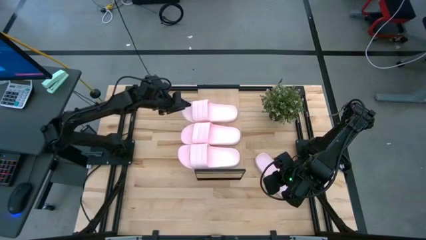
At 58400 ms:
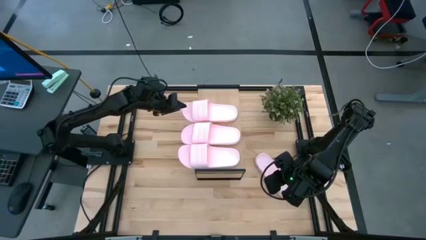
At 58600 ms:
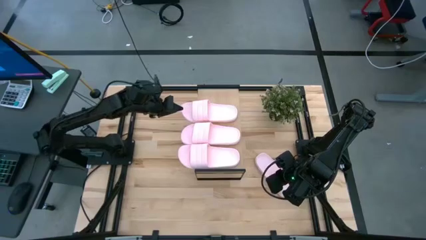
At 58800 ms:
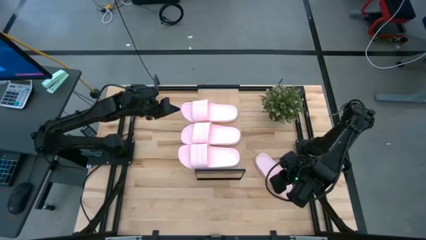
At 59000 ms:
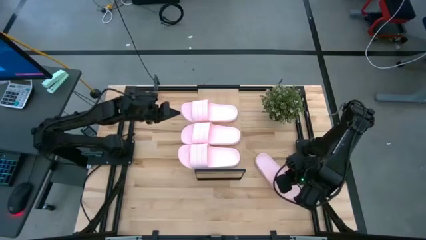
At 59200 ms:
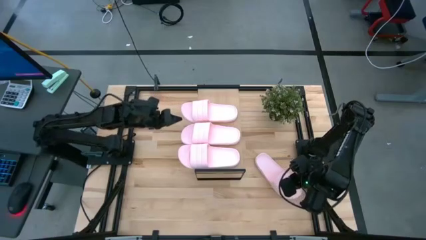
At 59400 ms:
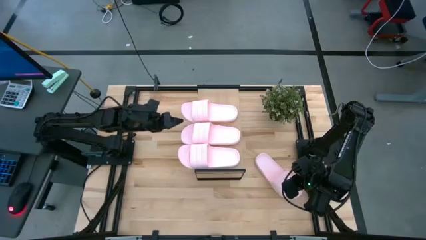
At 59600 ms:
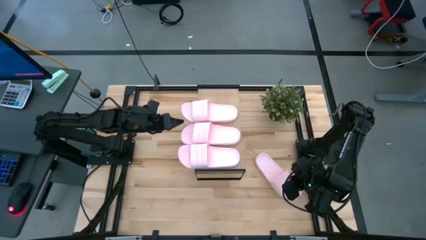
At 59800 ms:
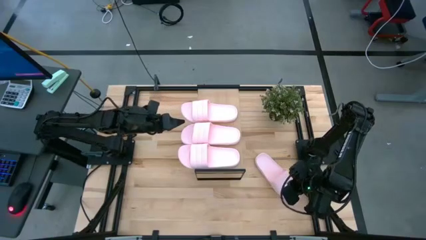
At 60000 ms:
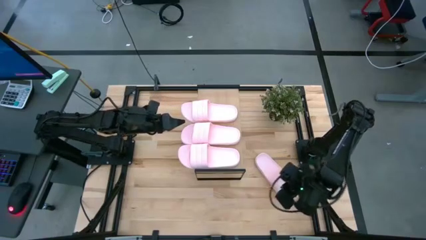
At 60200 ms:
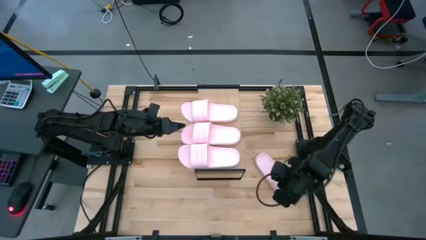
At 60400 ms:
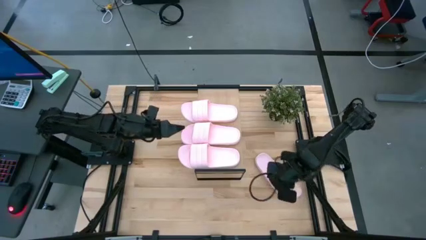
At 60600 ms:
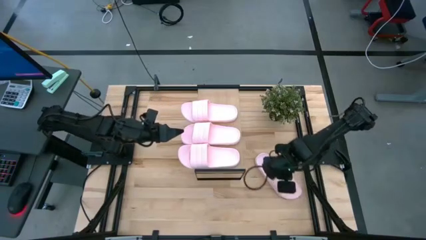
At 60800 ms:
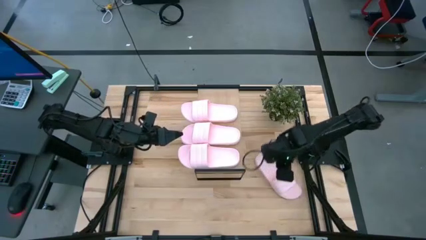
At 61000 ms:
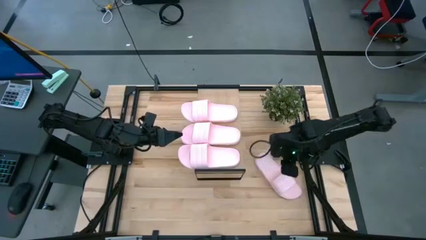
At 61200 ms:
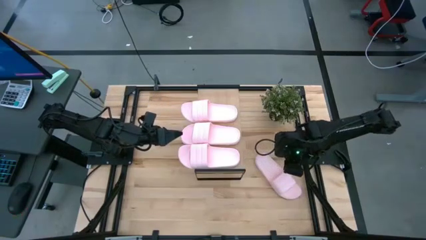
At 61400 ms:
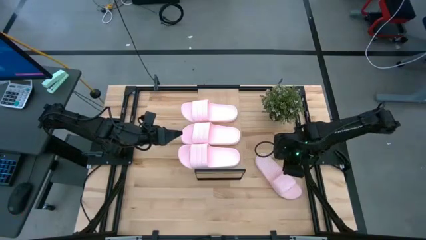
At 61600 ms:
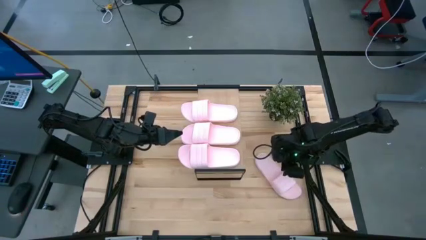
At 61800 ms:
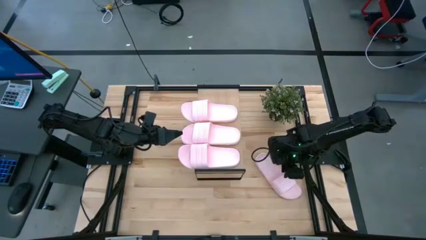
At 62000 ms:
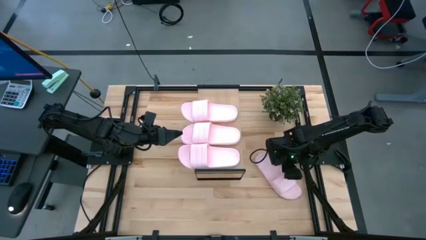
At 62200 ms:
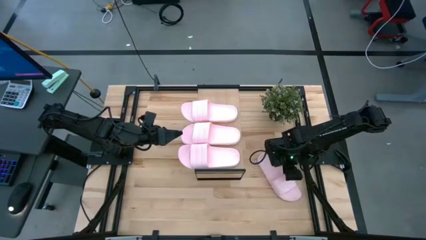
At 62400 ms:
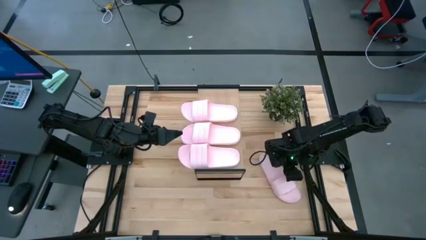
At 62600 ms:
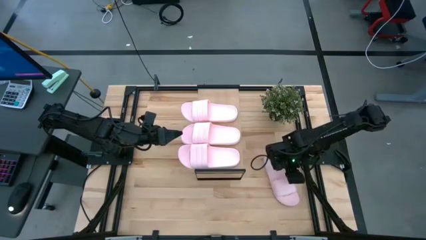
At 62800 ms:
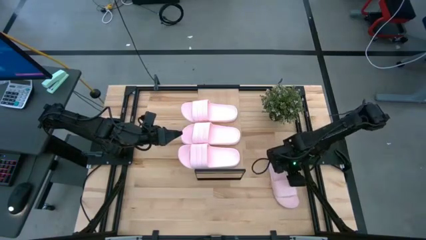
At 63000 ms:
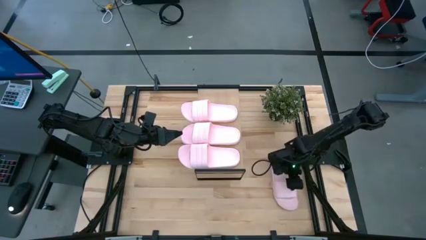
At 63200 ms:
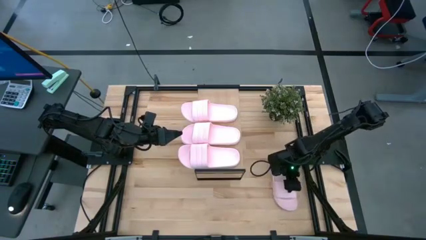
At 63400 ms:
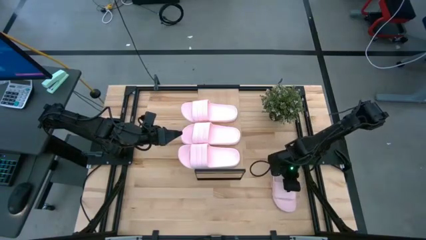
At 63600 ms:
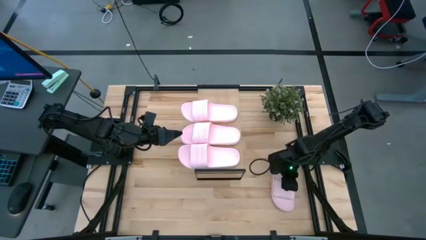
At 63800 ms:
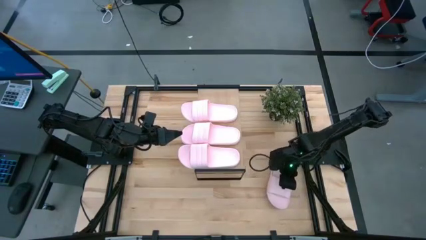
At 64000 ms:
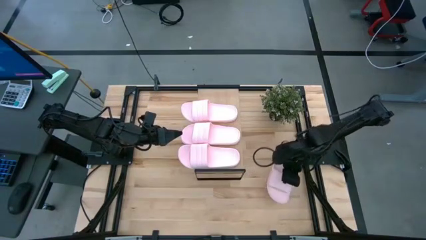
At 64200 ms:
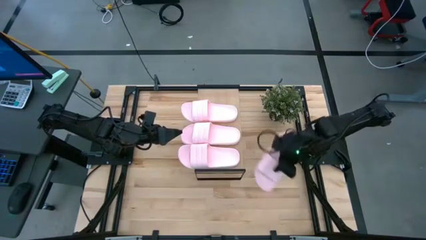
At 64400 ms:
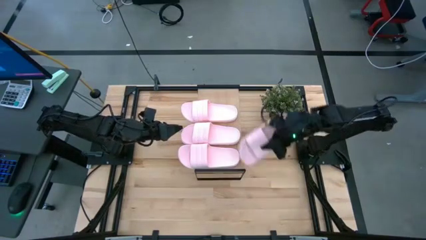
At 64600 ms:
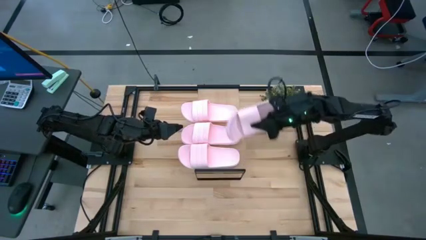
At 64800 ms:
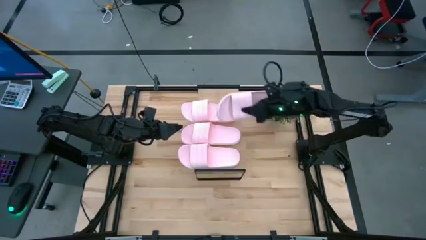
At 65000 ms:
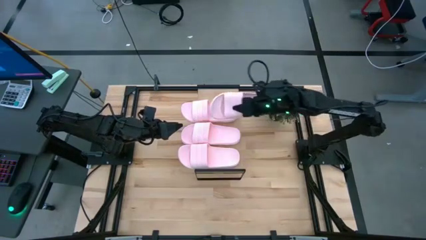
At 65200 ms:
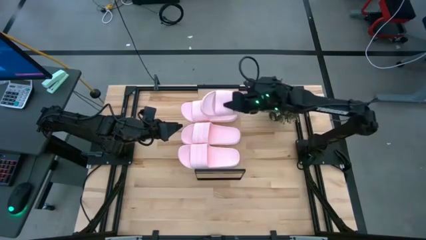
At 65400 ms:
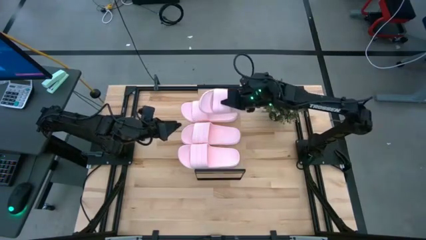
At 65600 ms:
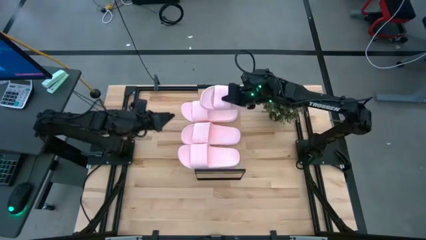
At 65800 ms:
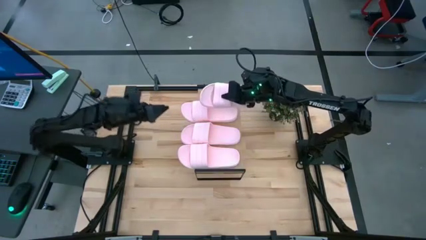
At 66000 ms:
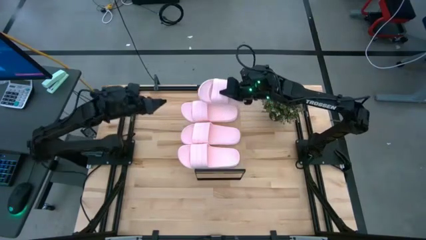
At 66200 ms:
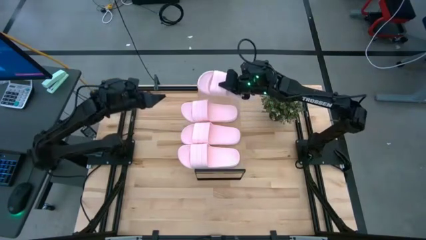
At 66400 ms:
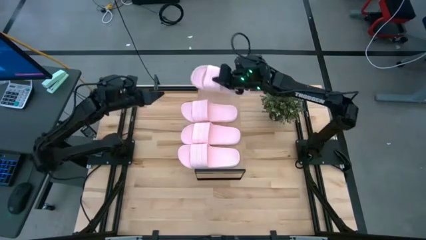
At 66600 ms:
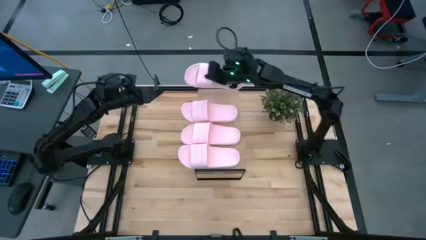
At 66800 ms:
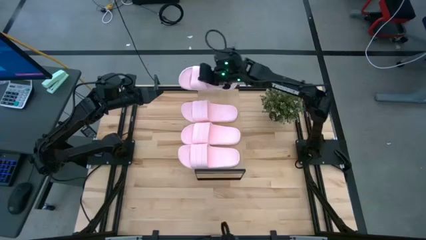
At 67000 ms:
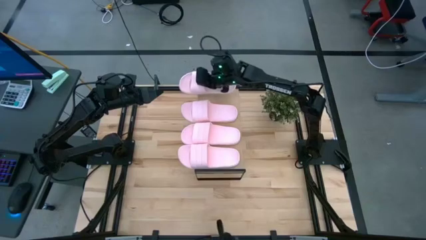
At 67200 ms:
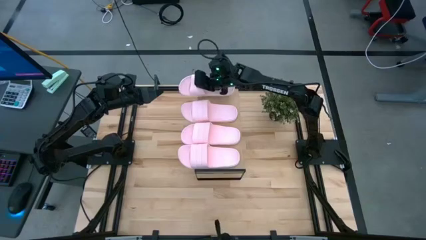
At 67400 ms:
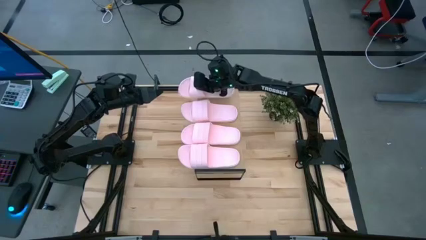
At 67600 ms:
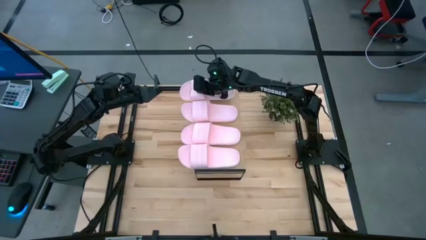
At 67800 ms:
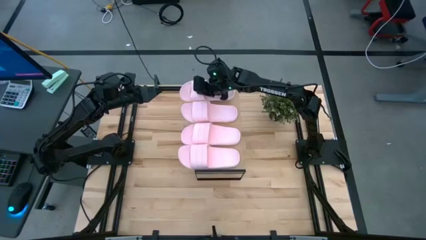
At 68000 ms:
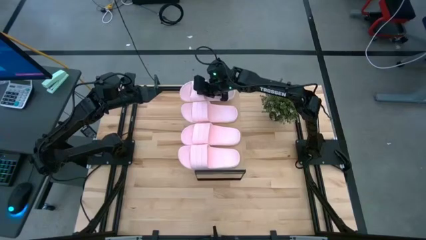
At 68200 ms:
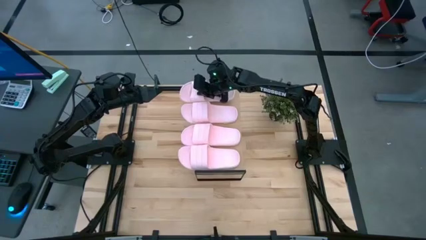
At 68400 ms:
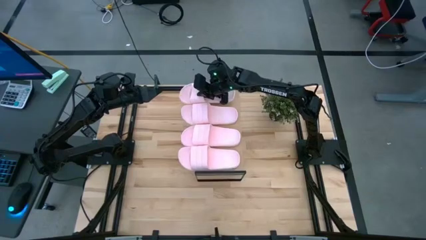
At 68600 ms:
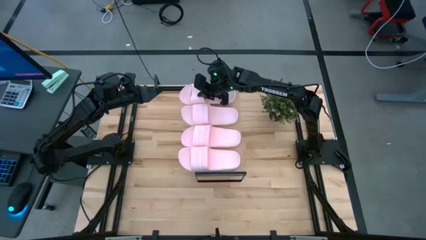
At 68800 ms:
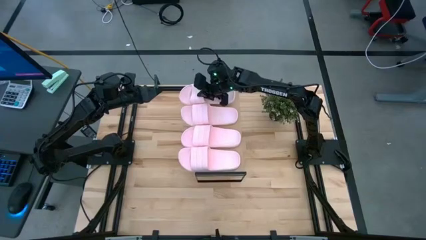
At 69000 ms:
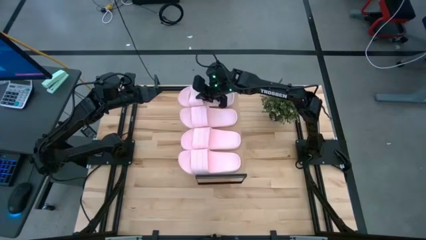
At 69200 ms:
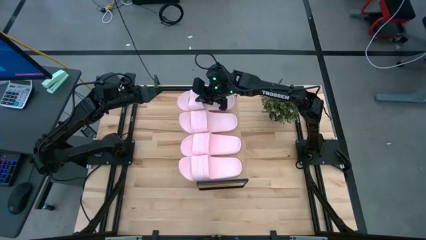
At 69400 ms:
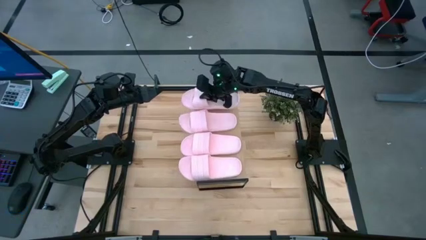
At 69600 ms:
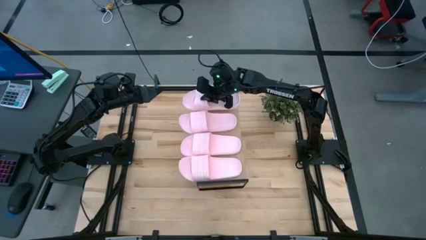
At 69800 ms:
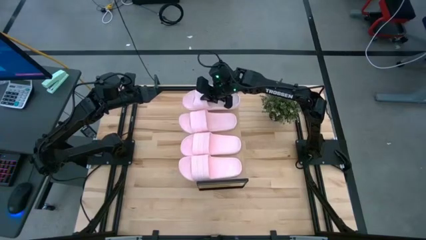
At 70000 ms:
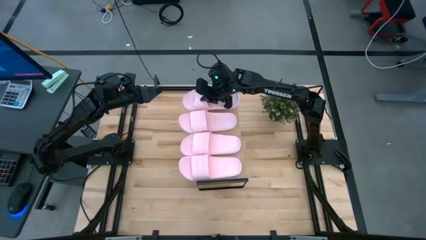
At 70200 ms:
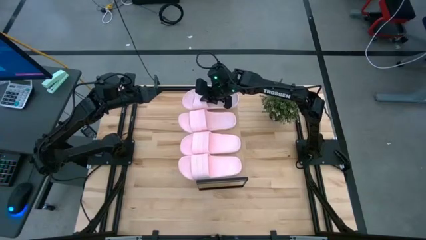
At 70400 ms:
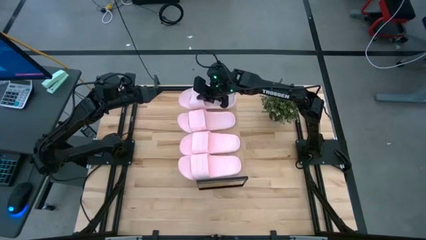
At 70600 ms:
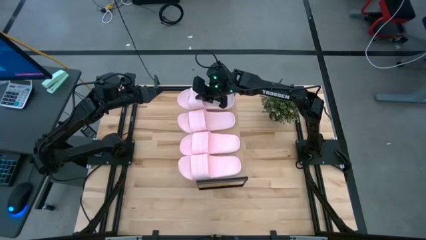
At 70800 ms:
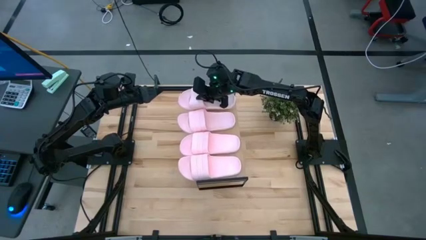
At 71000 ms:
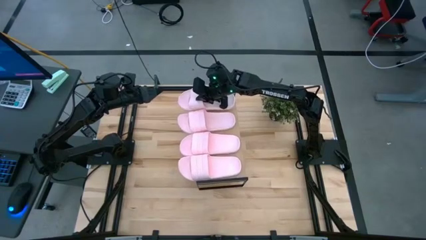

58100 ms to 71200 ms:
Task: Pick and place slides into the shelf
Put the pink slipper on the shelf
